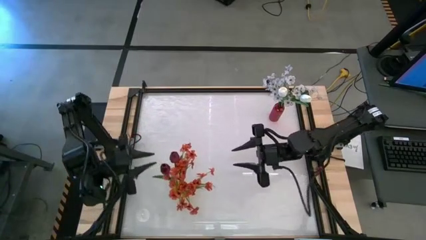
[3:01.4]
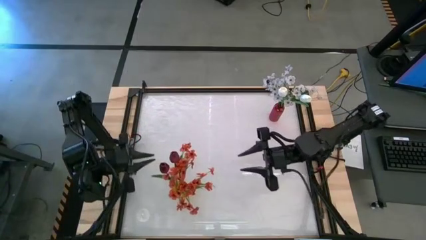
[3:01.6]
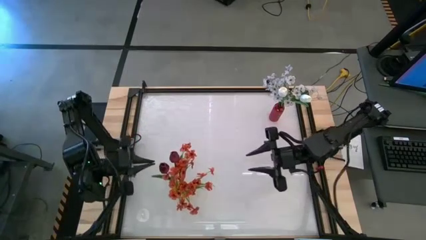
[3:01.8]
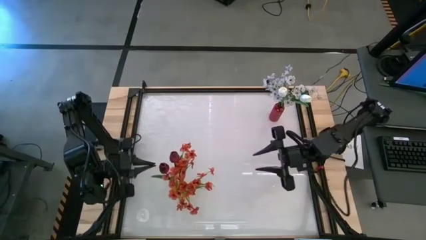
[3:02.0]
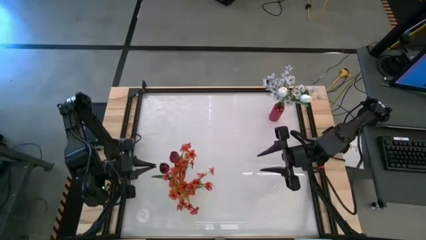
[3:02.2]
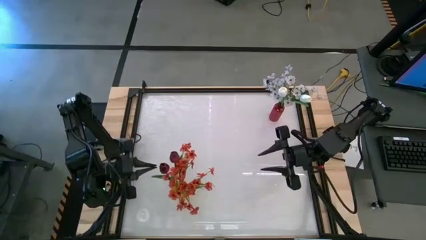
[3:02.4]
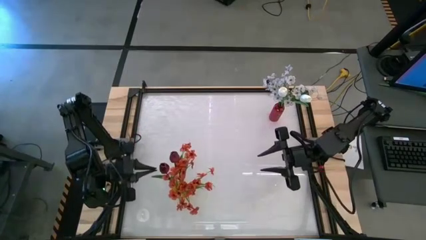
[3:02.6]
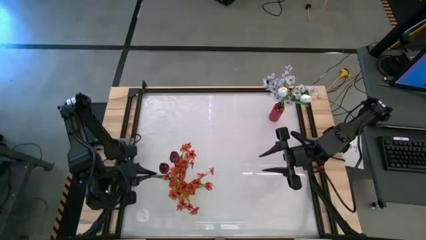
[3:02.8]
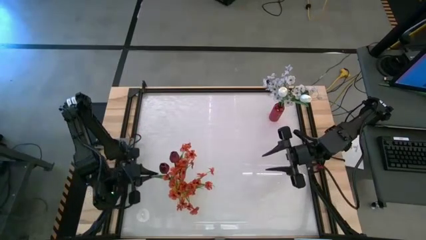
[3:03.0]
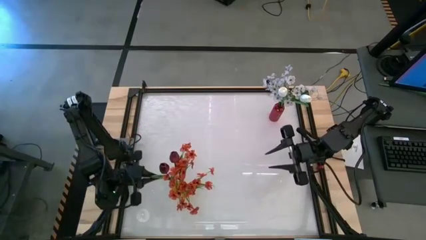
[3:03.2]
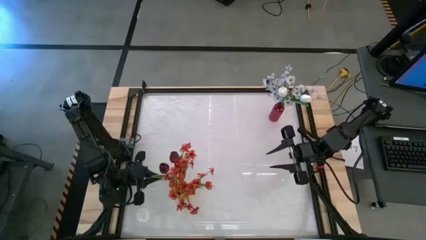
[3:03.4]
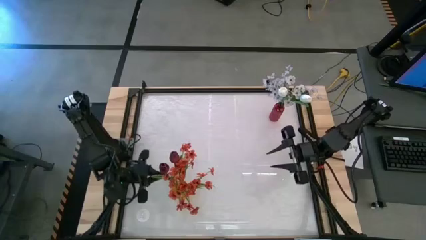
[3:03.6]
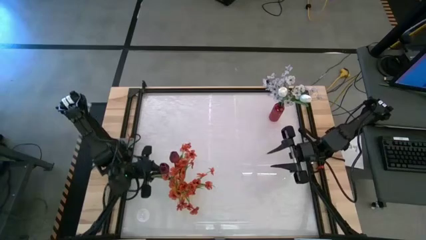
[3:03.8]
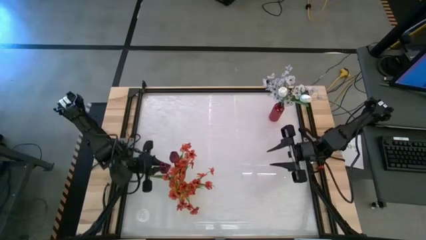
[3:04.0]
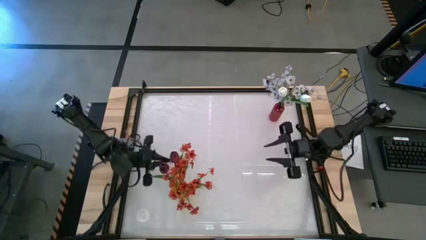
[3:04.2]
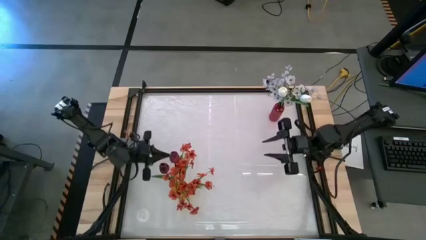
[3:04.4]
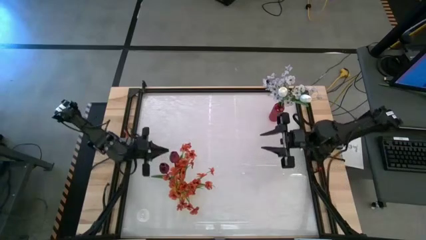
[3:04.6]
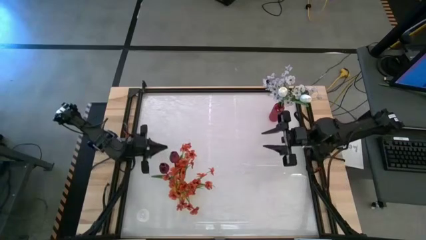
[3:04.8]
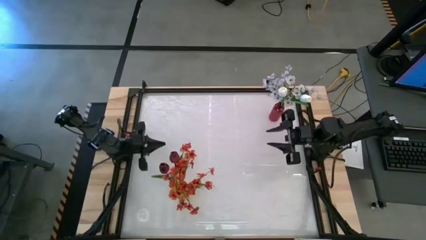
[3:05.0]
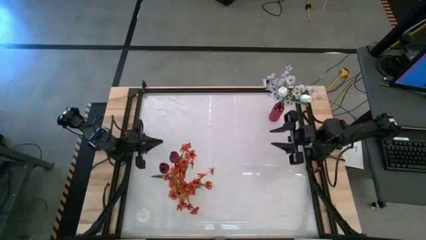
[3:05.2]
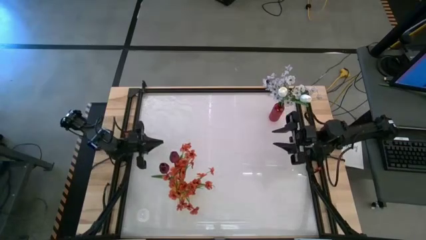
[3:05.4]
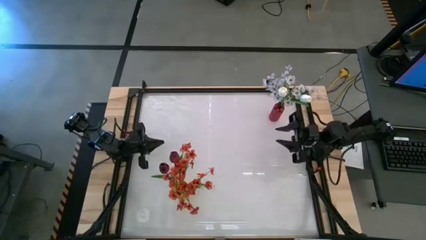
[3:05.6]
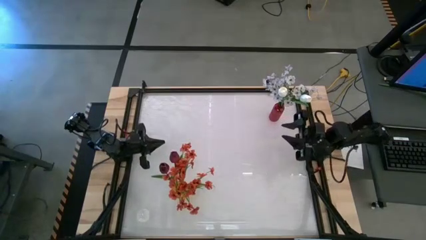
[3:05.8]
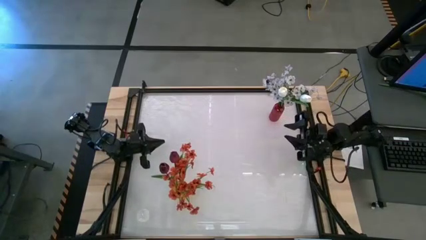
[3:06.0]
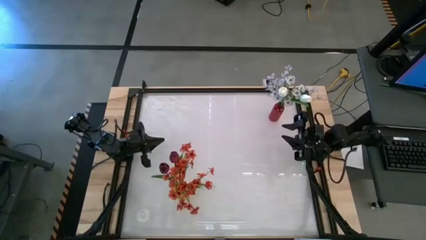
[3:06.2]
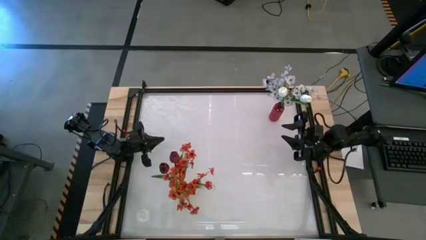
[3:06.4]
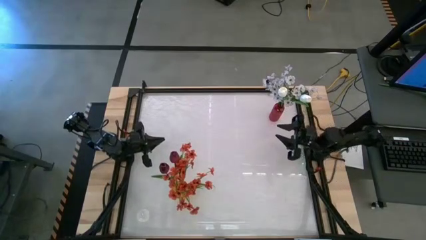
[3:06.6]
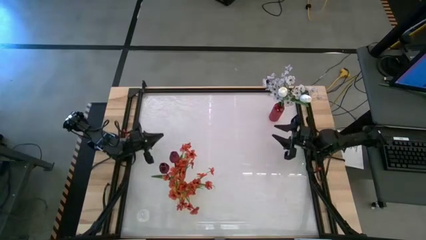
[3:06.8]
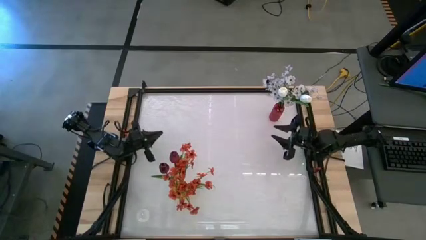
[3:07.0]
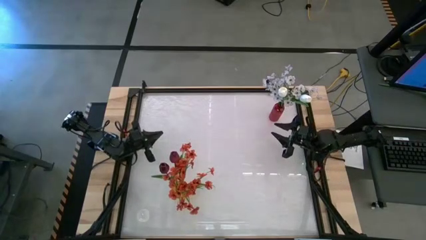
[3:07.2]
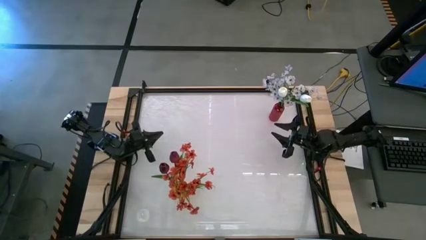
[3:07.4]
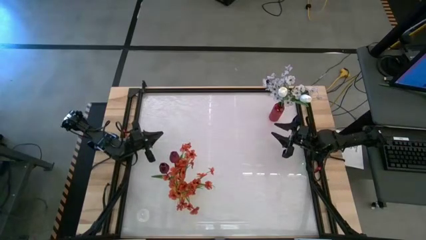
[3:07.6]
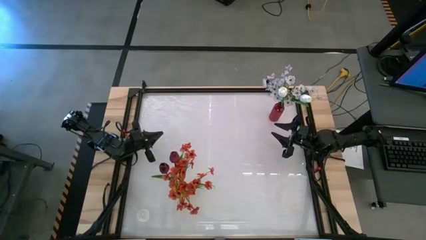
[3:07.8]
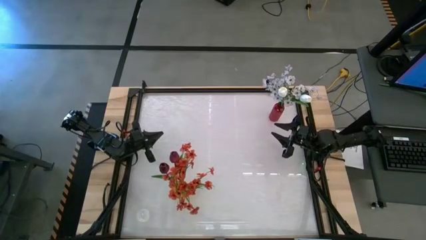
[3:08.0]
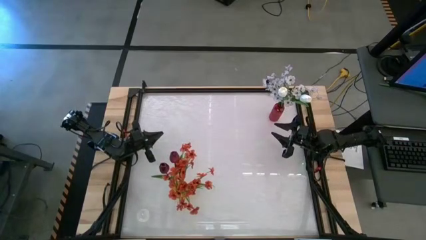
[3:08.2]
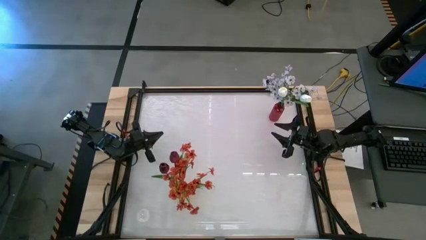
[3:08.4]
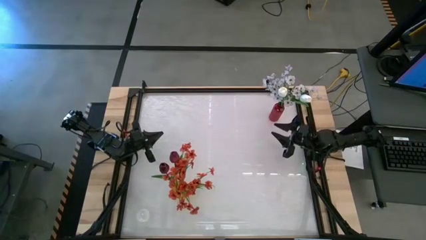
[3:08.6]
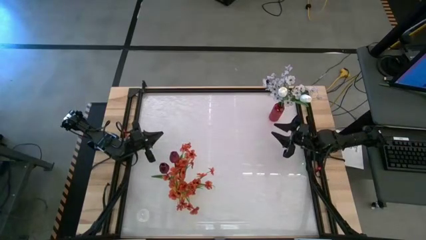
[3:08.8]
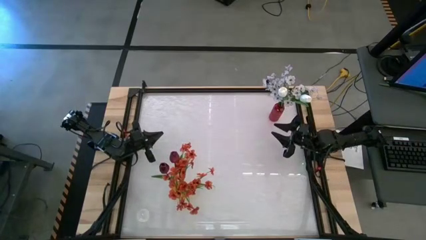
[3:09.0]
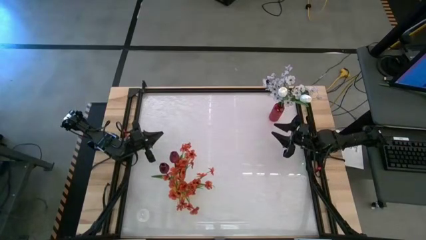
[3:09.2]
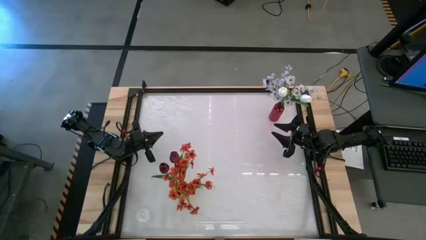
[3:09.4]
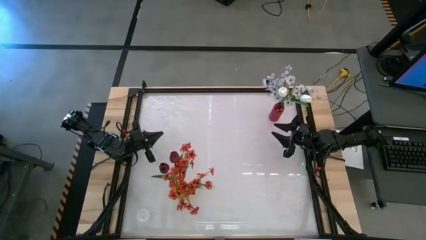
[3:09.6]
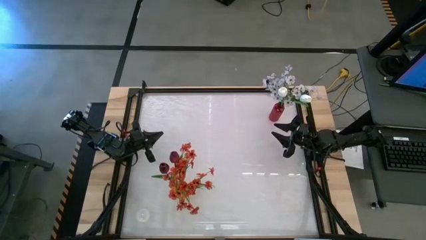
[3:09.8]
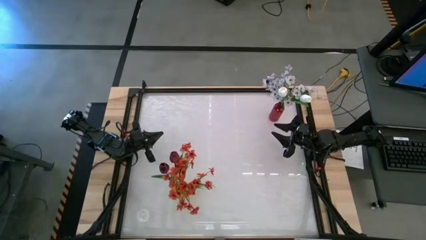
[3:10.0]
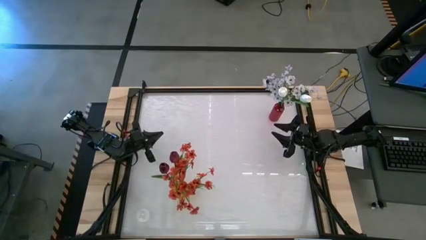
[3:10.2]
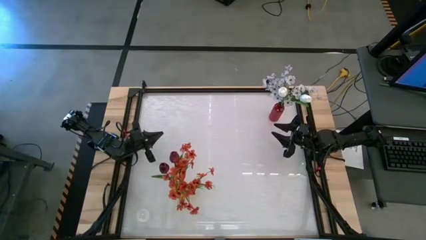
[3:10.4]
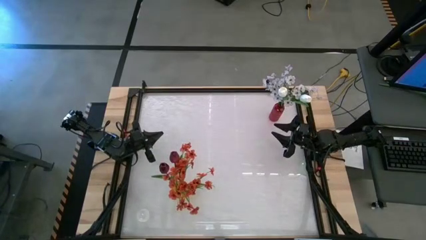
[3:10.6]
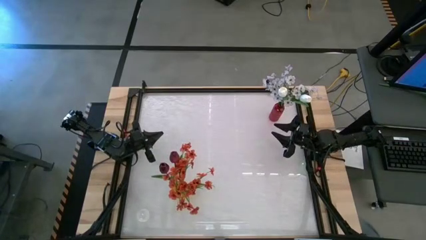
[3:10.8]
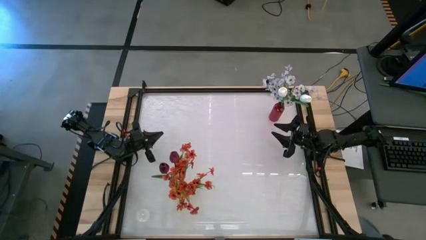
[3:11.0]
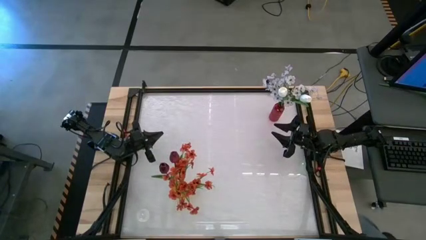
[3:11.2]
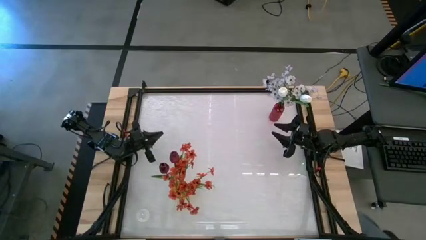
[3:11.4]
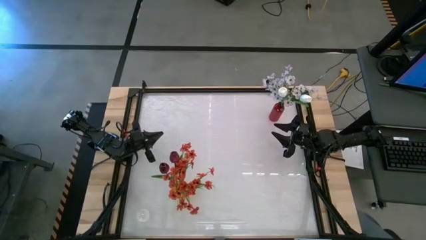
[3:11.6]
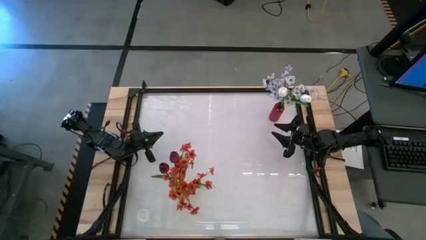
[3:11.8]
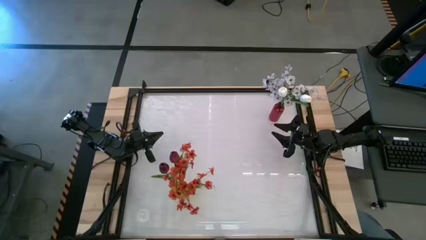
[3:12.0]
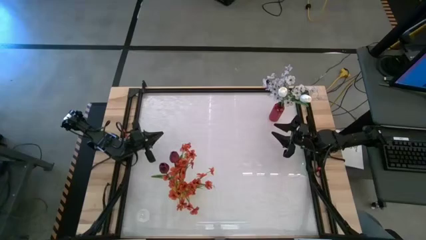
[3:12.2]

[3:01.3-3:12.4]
Task: Sort flowers into vase by color
Return to Home Position

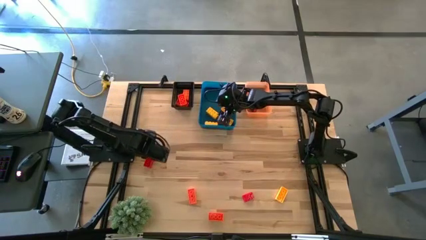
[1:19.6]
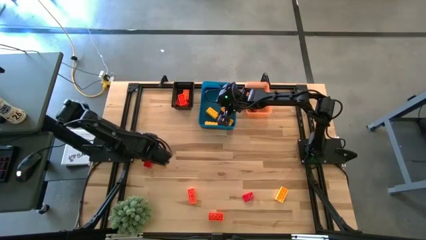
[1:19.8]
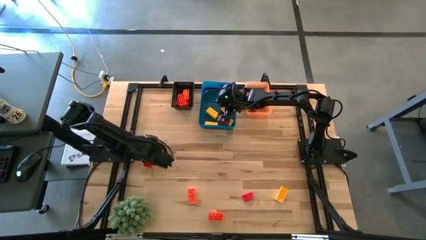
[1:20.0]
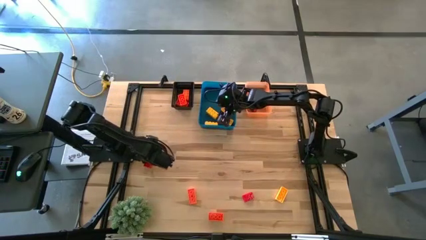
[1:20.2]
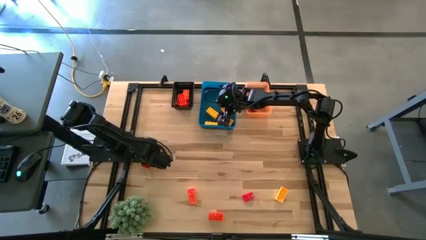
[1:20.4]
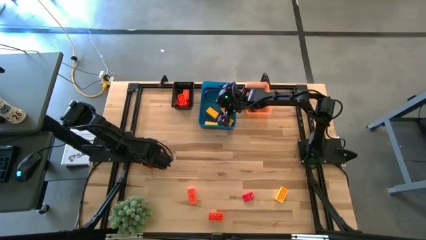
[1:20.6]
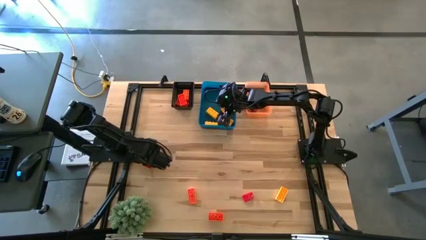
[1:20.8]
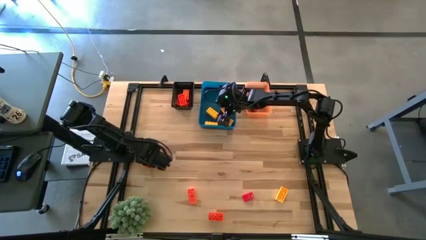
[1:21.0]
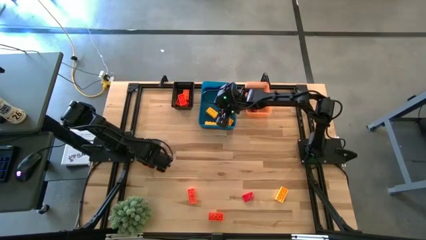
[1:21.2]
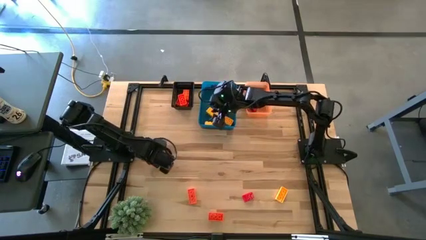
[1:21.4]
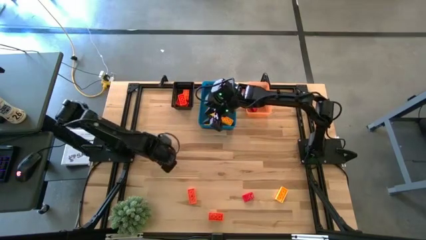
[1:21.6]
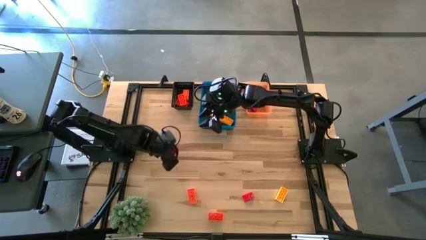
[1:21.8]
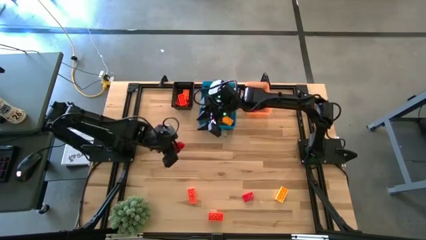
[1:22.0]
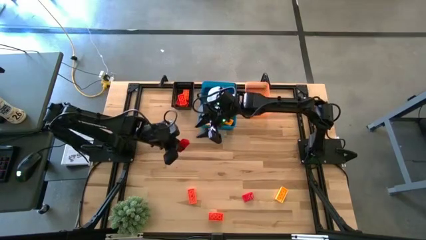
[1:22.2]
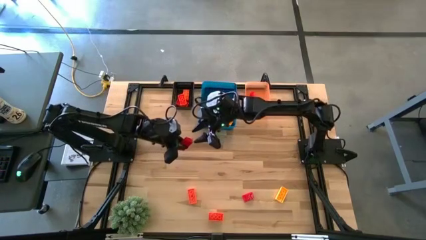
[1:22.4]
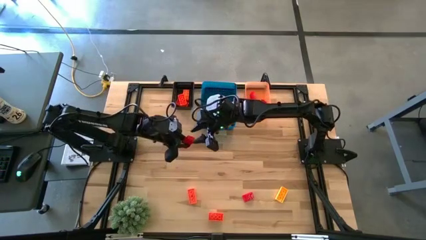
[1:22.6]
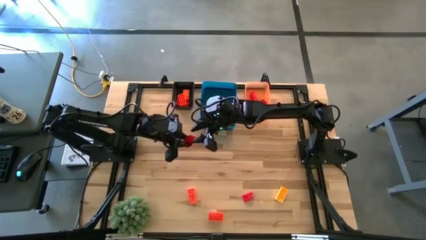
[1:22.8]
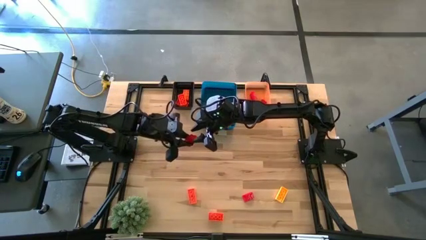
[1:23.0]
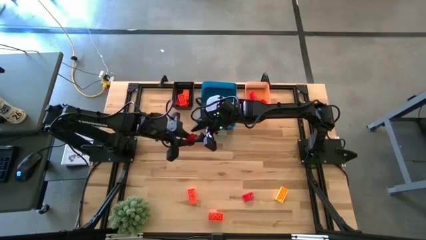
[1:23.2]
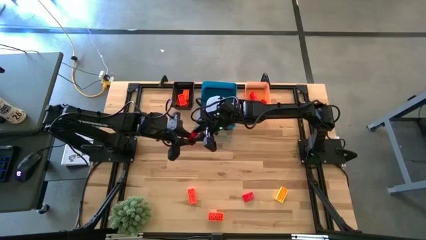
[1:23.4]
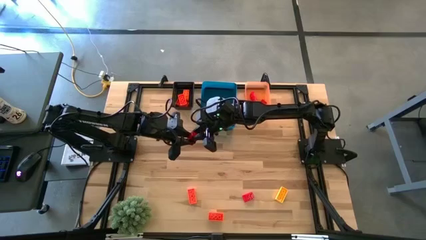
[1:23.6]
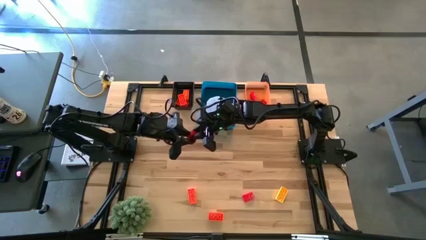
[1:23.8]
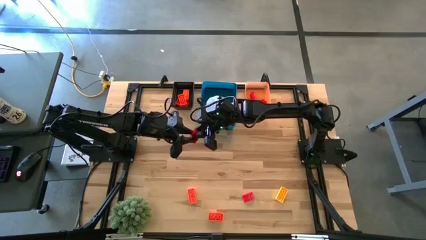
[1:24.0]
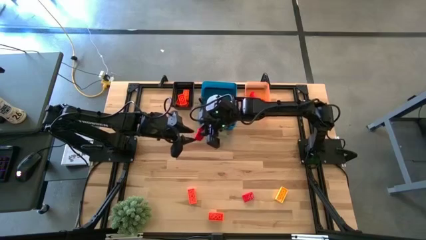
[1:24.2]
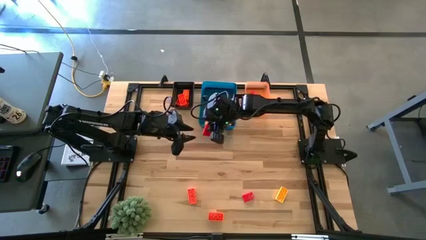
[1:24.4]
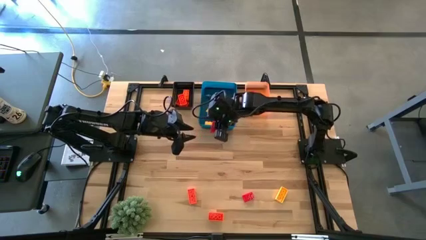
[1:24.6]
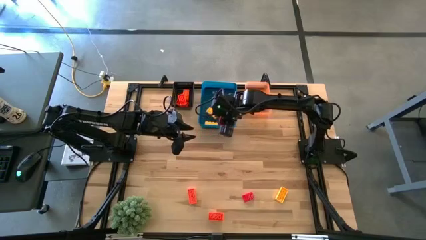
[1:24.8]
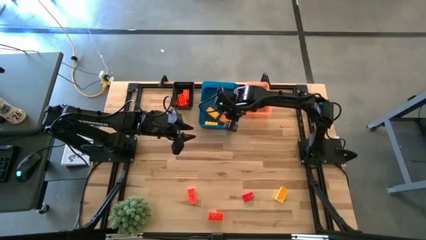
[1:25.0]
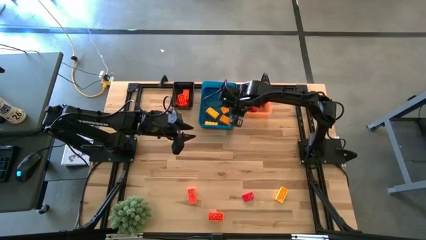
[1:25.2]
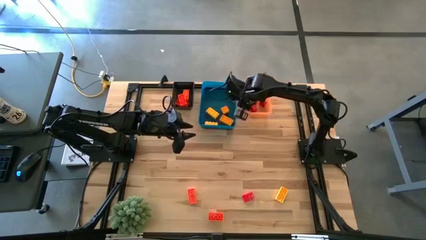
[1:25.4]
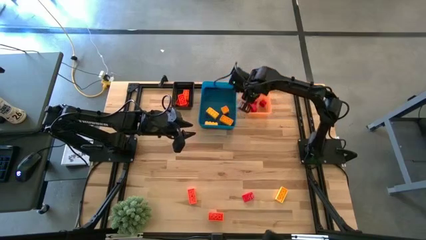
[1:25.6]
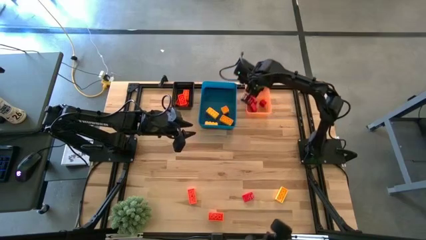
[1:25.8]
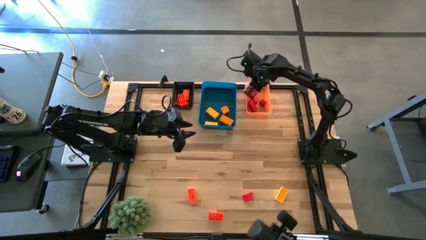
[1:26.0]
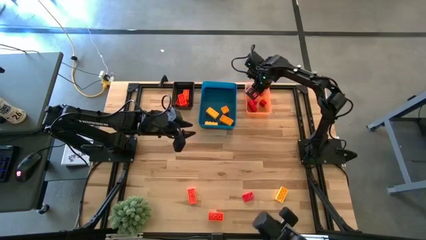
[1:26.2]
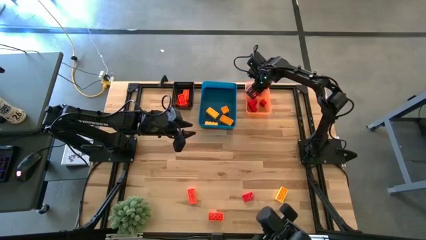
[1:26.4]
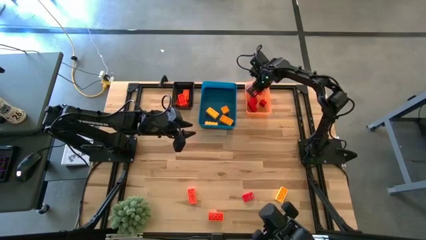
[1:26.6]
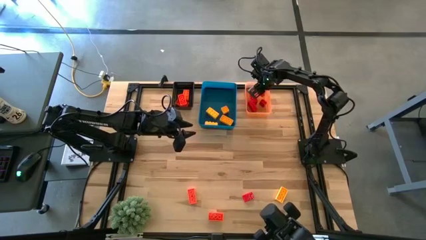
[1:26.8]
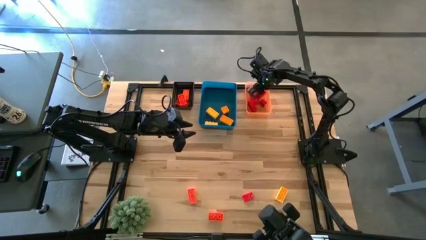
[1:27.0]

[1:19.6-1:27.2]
Task: Sort & place blocks by color
Put the red game piece into the orange bin
